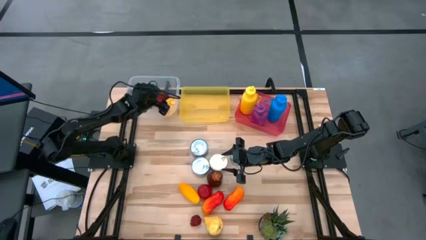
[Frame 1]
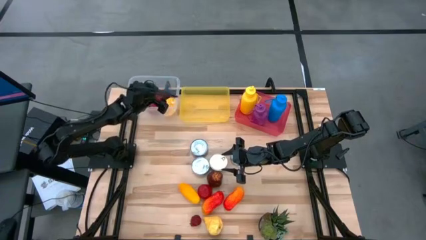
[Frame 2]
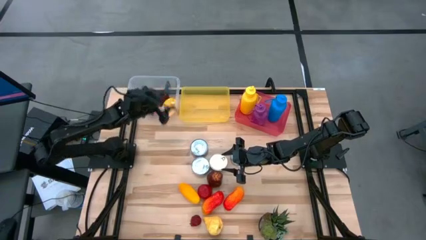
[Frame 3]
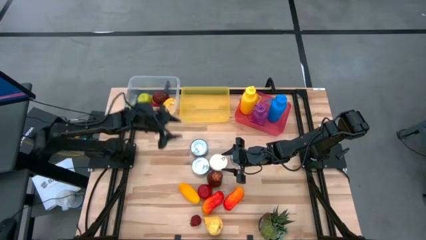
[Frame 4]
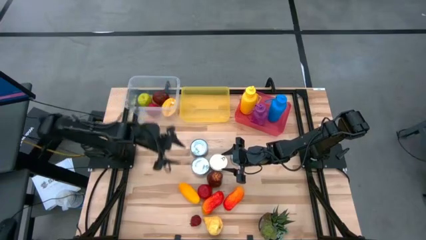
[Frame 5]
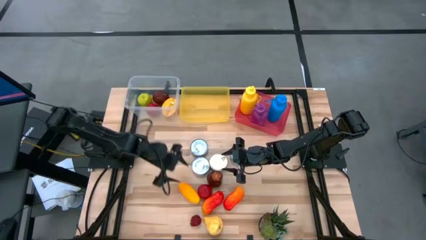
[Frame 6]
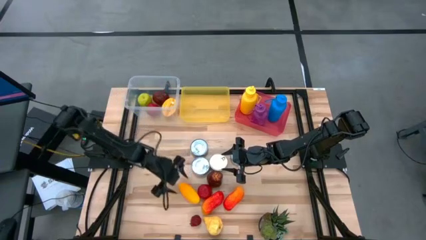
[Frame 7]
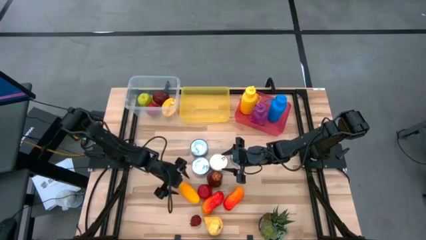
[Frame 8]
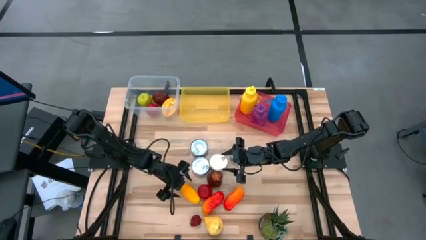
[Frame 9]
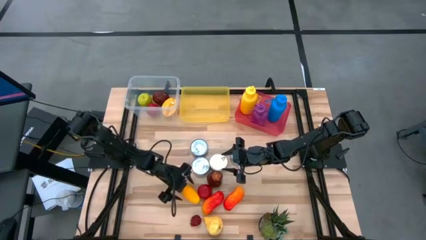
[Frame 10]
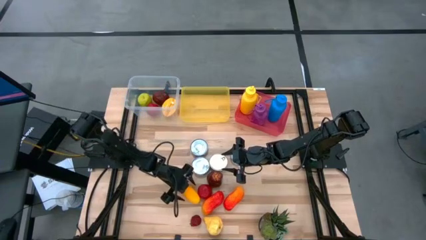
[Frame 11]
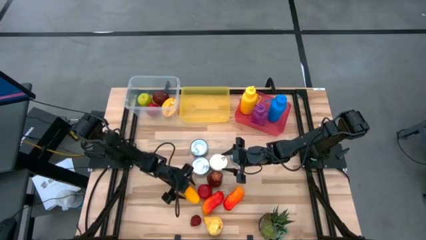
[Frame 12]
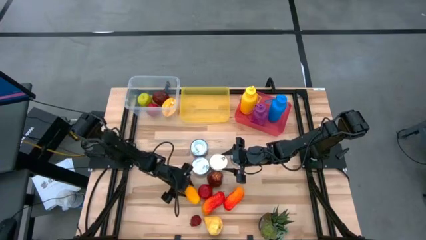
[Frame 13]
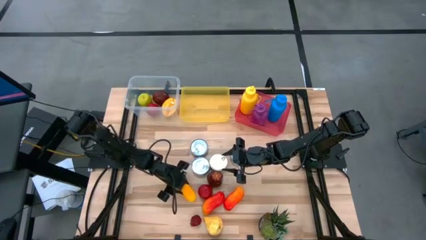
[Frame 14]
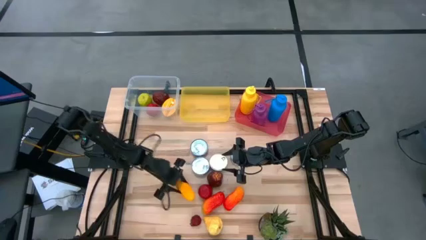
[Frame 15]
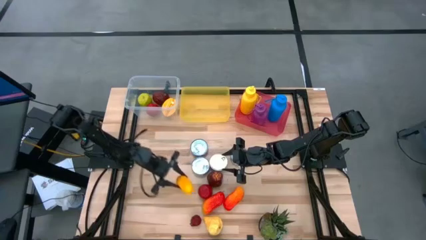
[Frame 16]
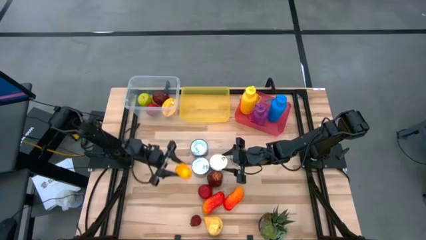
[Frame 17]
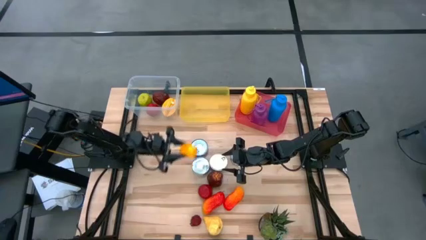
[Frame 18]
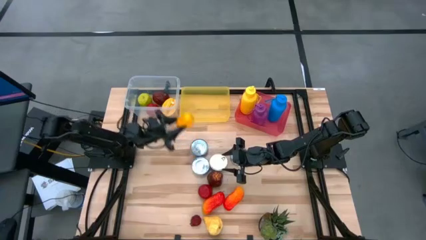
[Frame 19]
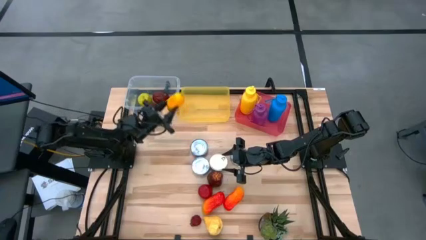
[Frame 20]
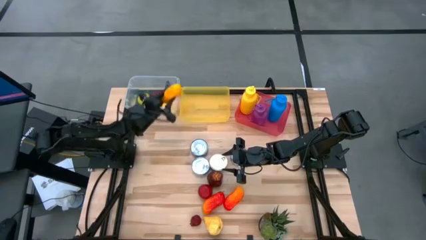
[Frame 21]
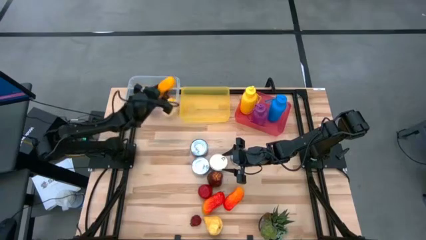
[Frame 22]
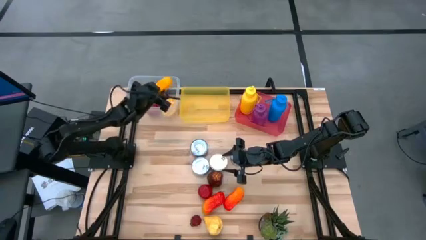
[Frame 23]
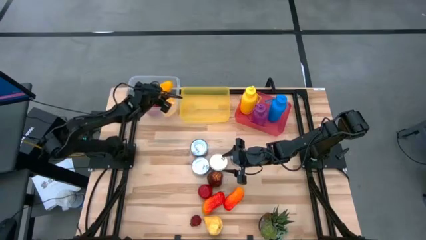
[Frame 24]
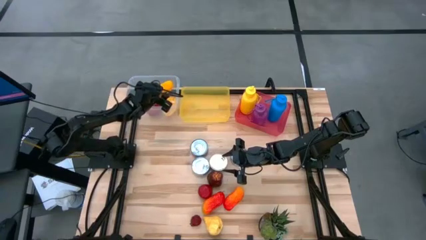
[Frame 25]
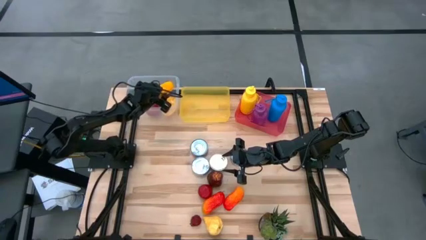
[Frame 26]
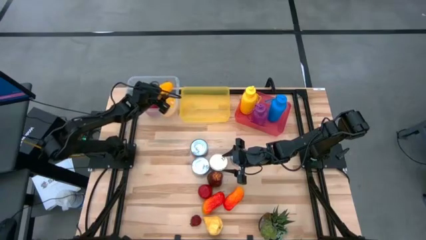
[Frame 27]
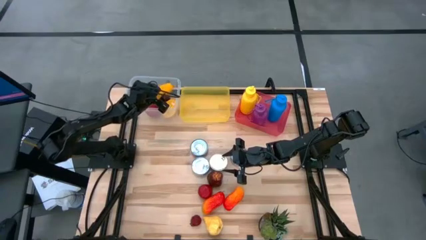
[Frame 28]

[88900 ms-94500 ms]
Task: Pick & Place Food Item
Put the yellow mango into the transparent bin

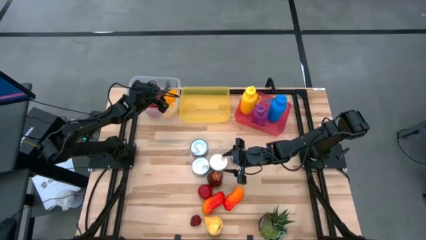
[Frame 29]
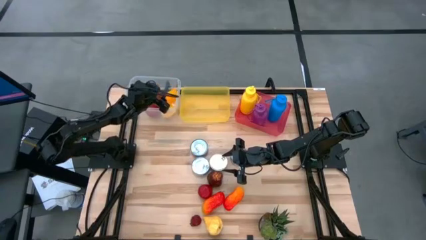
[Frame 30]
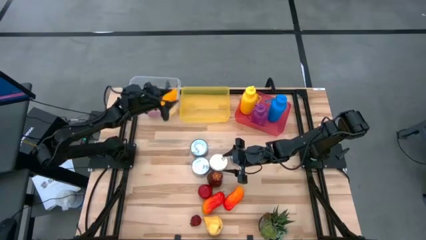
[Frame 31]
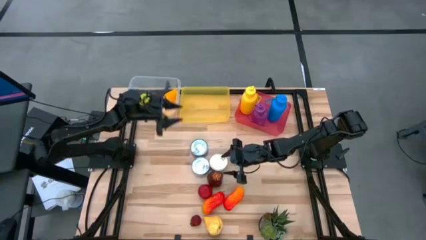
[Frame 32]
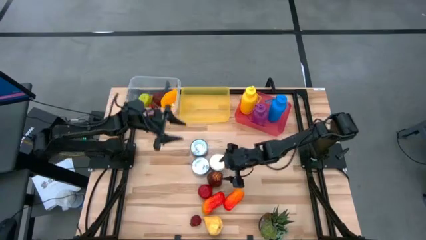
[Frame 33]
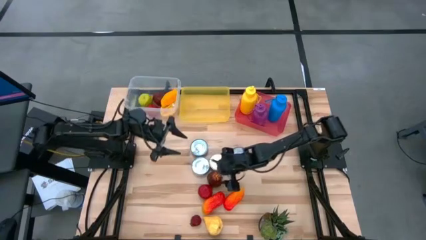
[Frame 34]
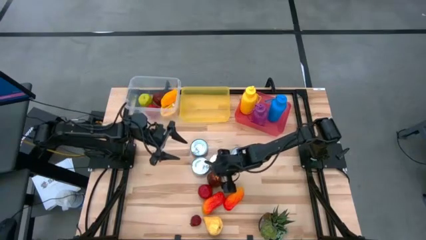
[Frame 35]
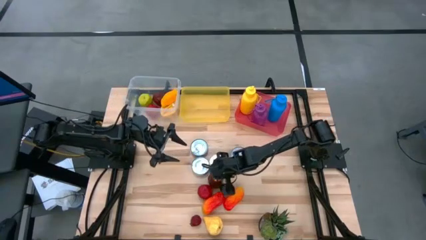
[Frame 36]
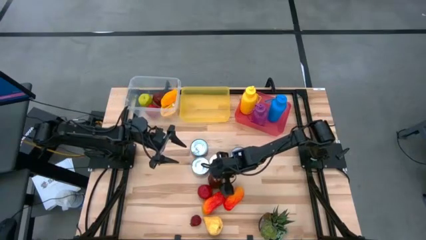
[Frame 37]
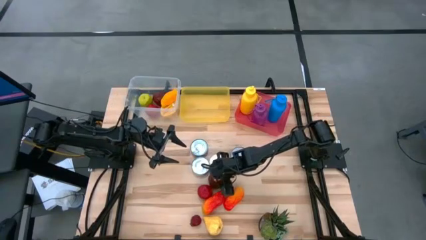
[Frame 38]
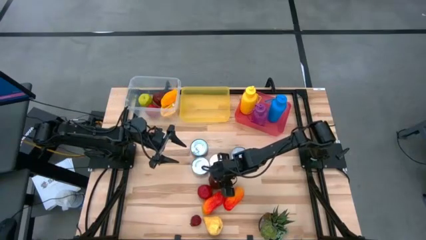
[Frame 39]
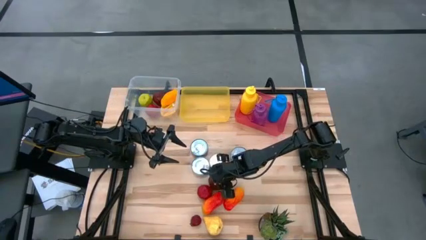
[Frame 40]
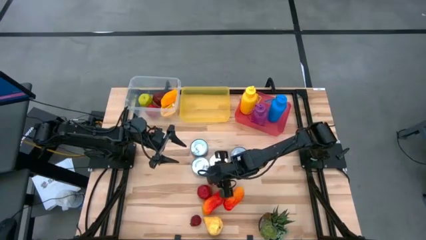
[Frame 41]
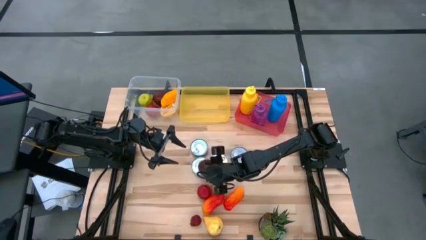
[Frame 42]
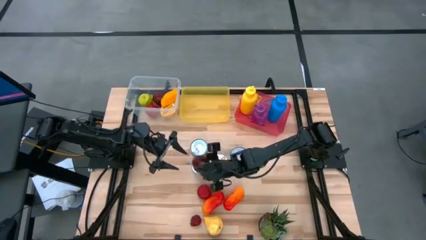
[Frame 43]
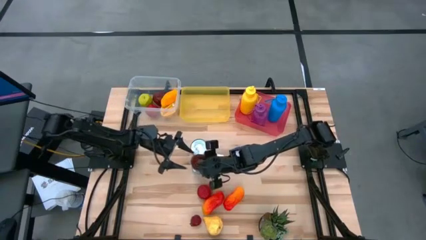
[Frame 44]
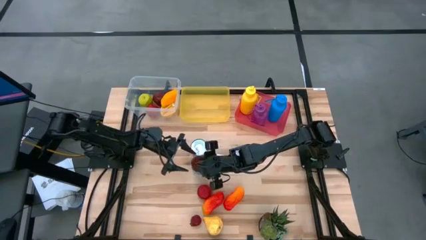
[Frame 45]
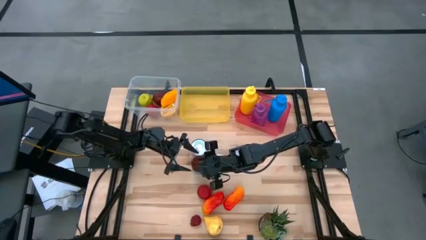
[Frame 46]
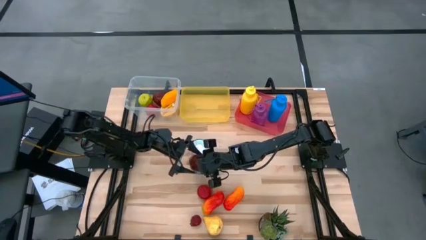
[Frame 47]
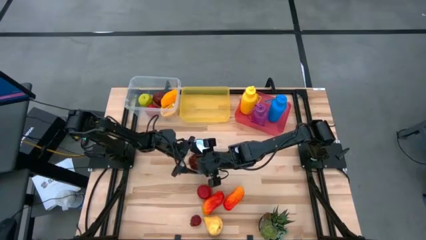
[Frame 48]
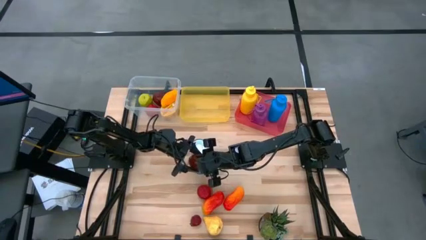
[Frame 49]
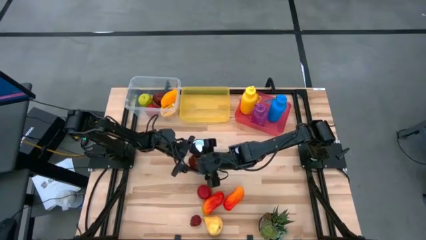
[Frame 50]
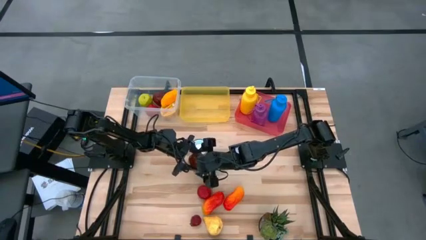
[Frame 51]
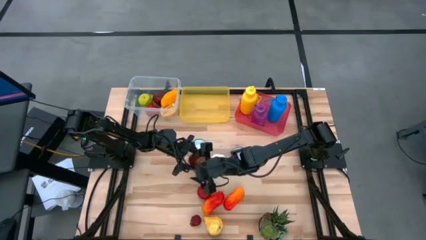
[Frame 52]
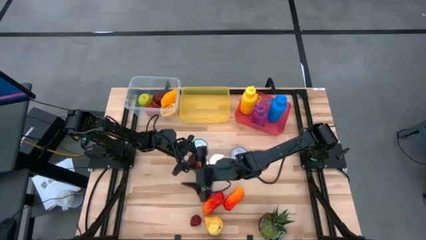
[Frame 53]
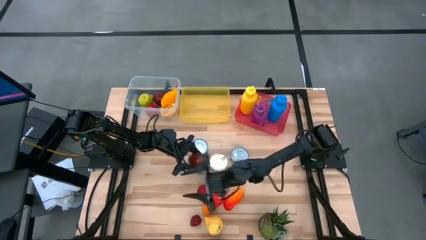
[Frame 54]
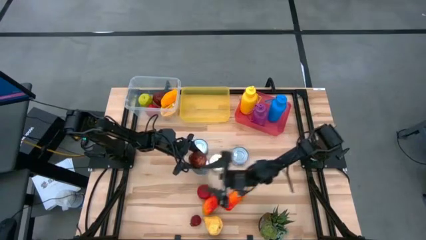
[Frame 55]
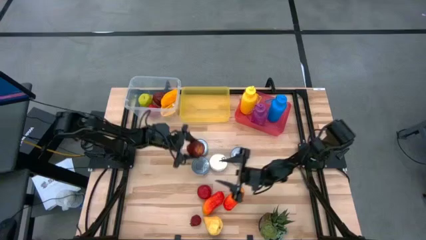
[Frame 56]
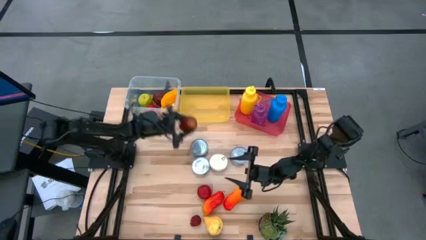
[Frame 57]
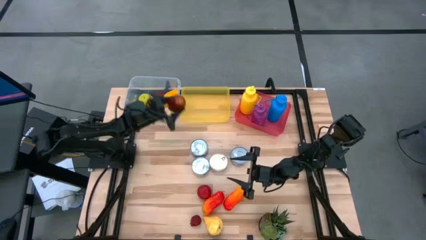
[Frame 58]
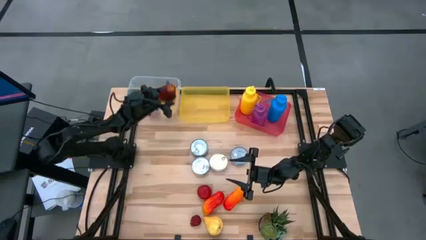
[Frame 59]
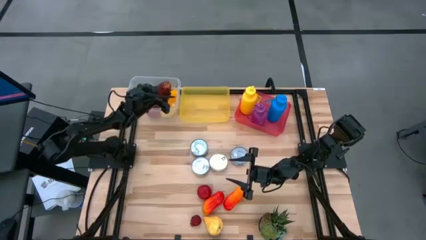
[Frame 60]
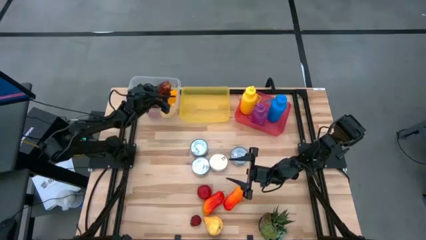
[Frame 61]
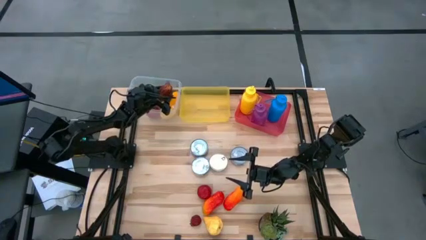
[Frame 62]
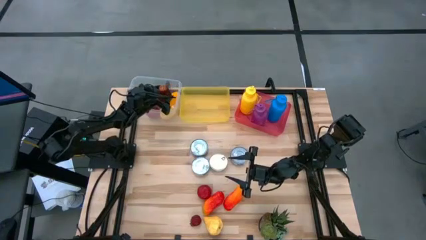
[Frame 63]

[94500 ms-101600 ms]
Put the dark red apple into the transparent bin

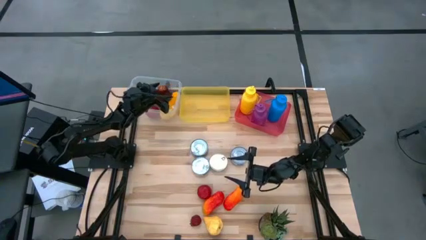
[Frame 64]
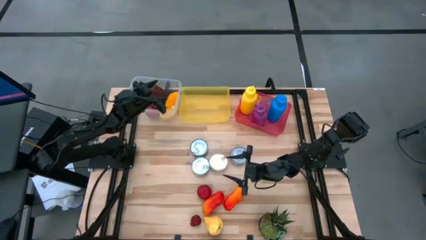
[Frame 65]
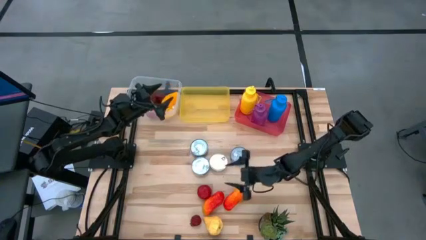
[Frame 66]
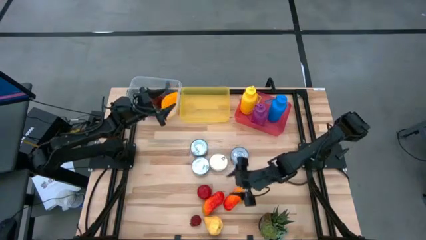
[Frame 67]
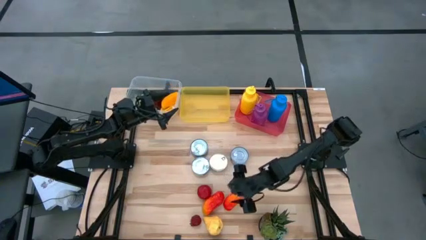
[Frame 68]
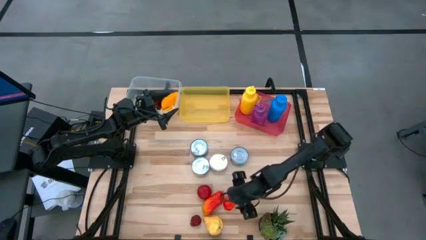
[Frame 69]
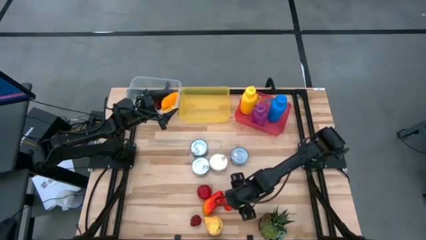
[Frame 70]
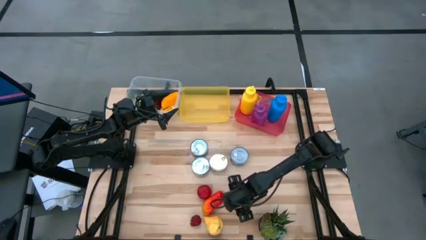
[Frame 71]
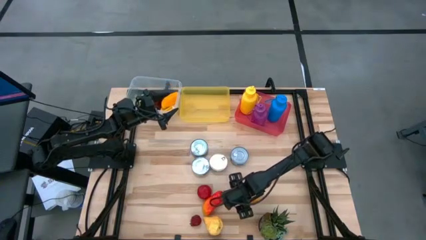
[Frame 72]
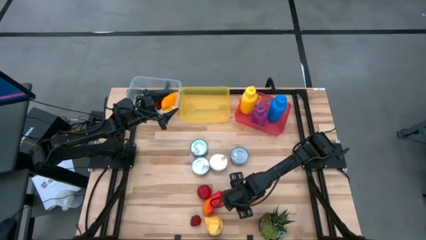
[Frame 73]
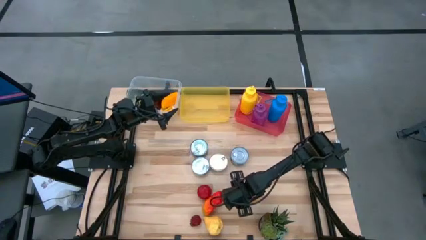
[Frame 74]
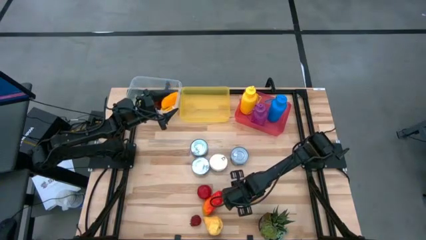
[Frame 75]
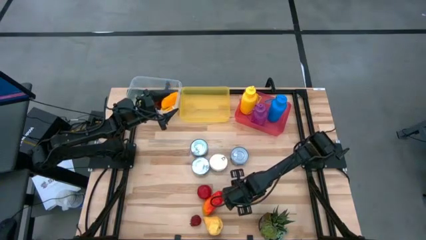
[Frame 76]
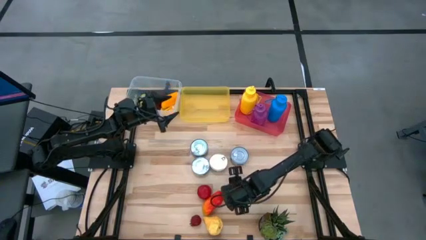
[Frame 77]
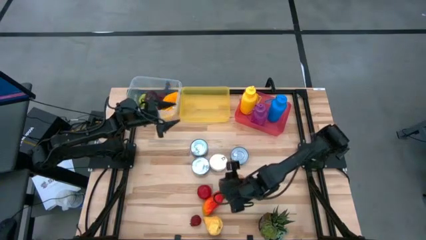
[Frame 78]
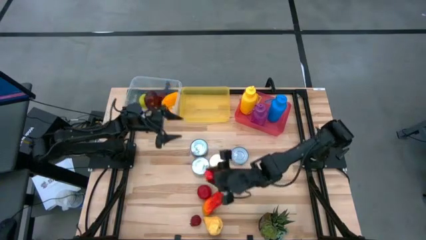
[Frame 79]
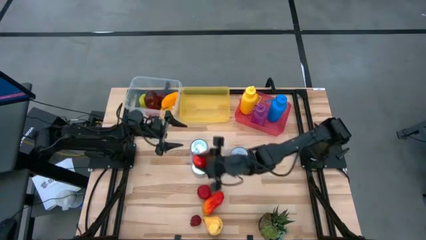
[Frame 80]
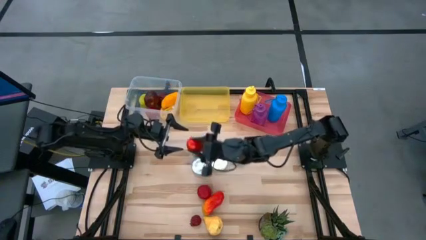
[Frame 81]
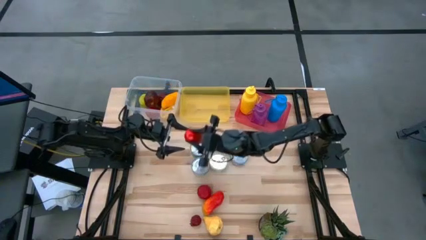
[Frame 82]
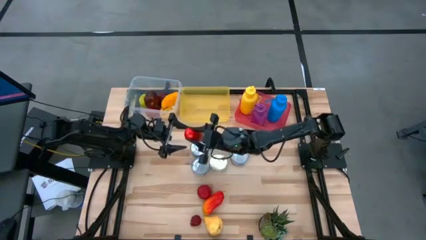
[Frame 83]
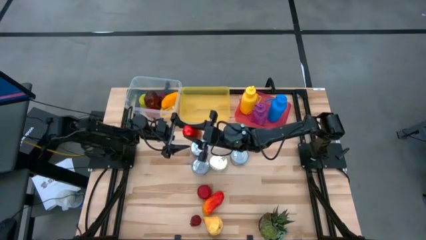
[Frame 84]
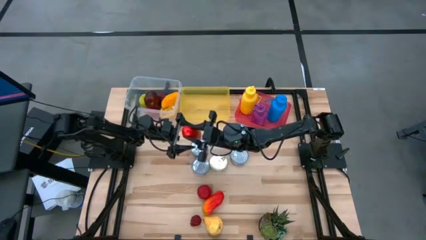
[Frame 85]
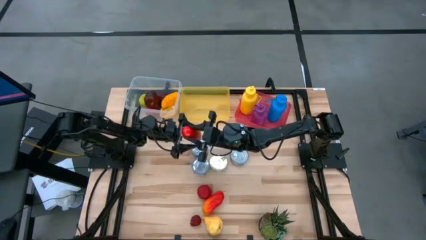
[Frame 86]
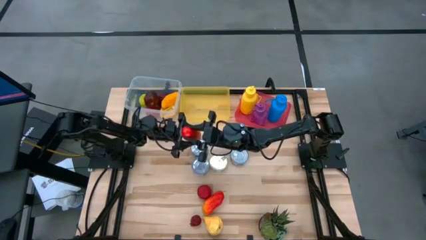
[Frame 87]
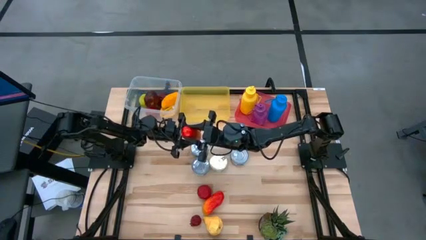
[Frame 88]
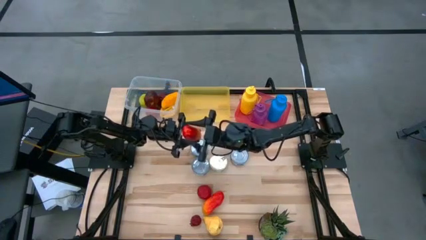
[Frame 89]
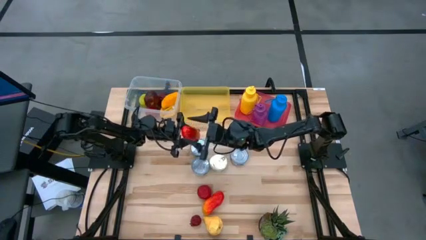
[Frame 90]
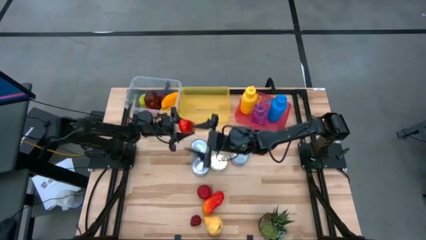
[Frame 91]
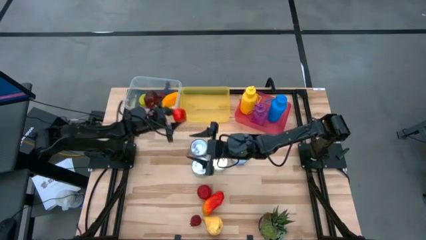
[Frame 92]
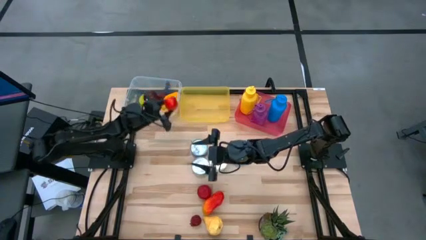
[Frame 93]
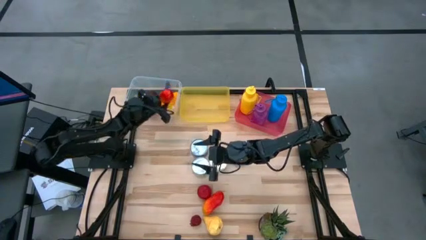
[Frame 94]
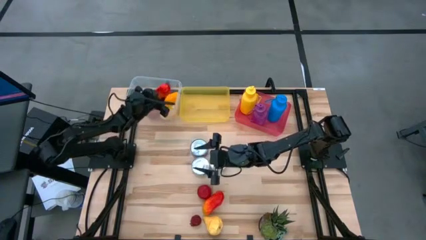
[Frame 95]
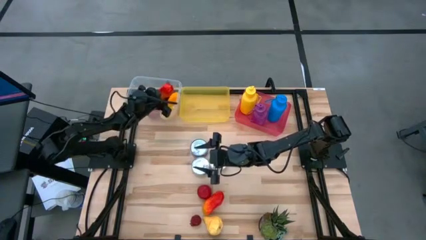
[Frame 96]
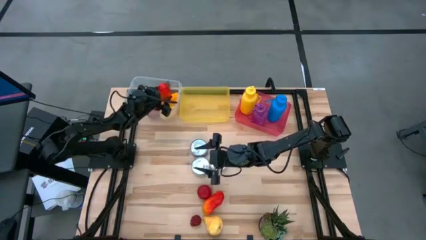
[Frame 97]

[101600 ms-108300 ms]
Put the right red mango into the transparent bin
